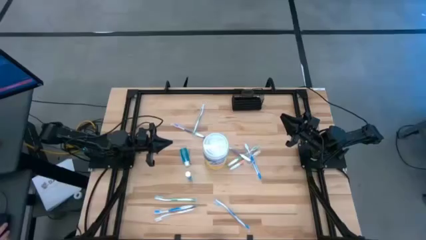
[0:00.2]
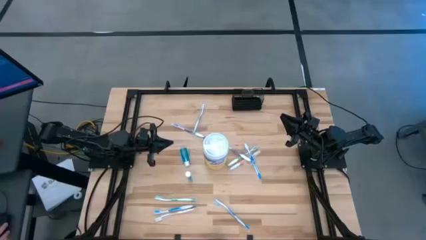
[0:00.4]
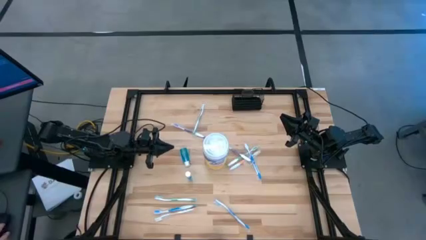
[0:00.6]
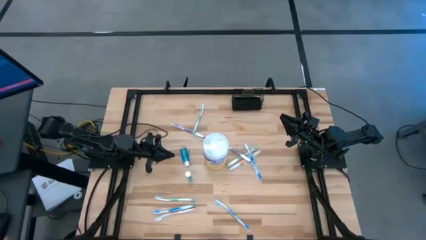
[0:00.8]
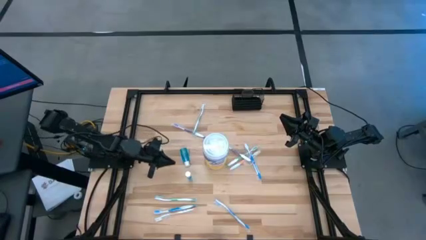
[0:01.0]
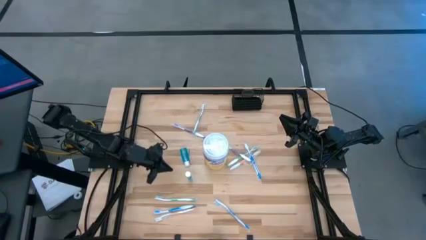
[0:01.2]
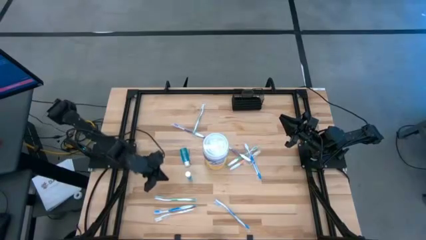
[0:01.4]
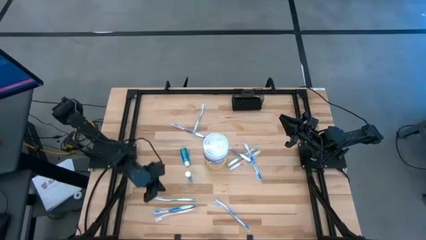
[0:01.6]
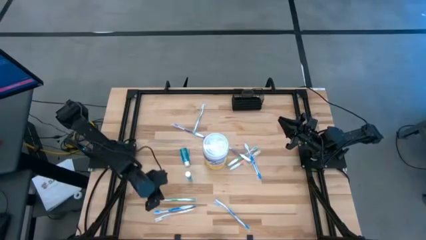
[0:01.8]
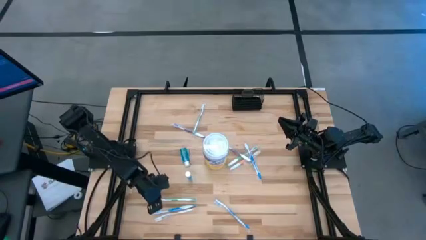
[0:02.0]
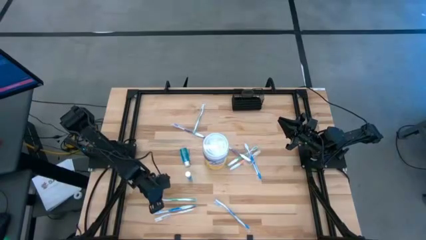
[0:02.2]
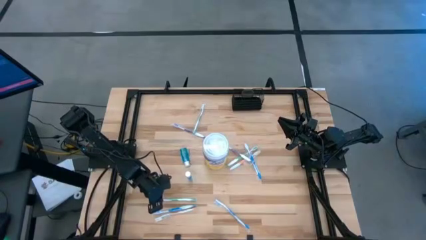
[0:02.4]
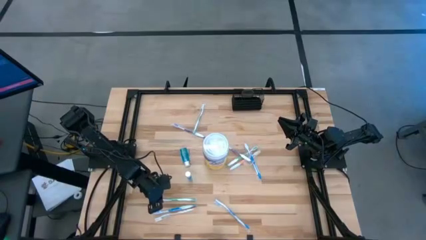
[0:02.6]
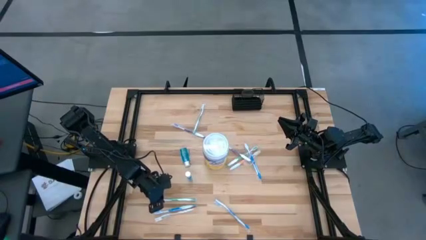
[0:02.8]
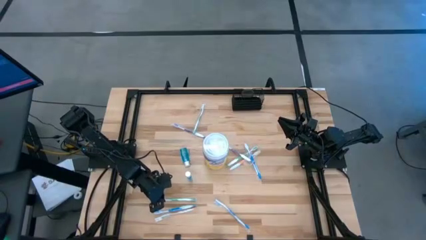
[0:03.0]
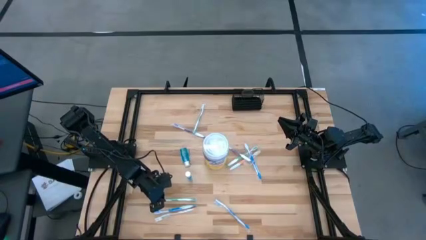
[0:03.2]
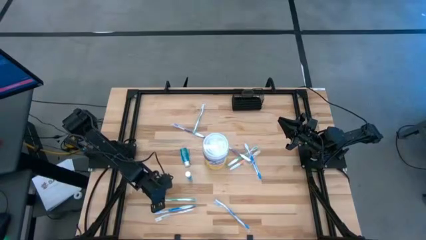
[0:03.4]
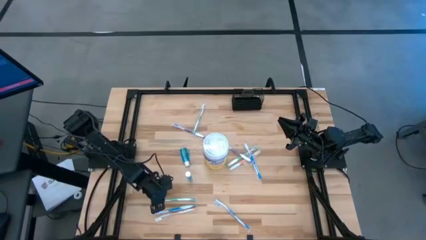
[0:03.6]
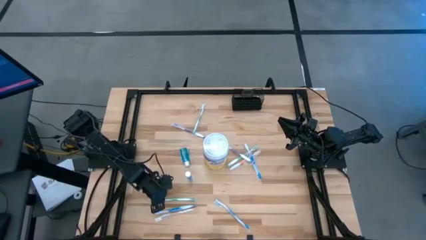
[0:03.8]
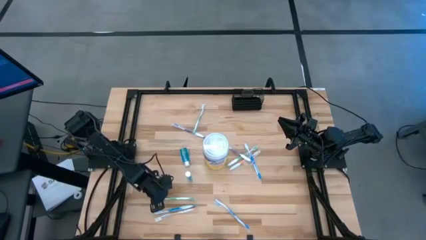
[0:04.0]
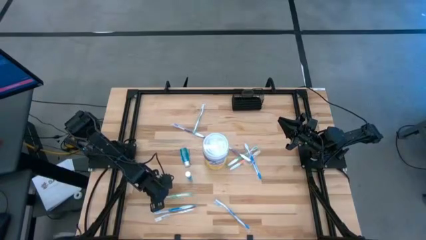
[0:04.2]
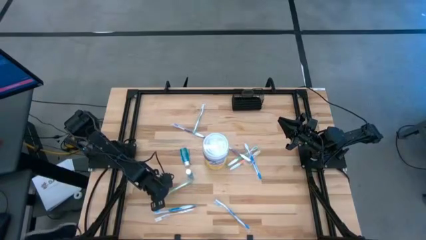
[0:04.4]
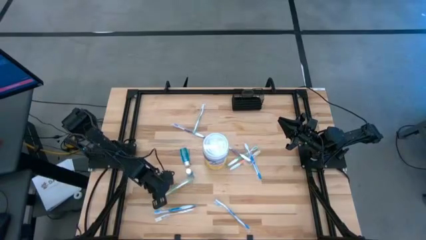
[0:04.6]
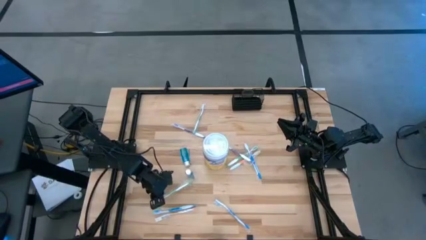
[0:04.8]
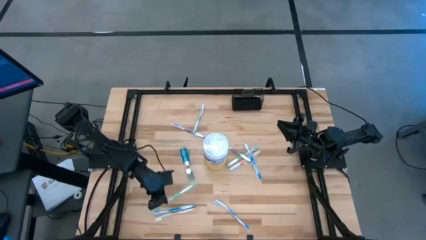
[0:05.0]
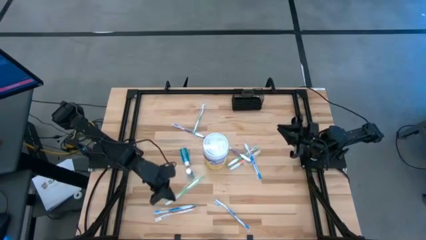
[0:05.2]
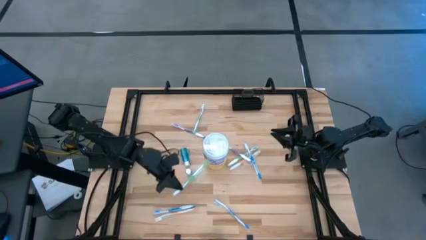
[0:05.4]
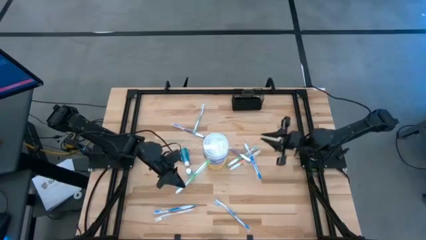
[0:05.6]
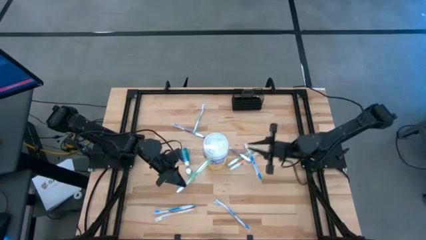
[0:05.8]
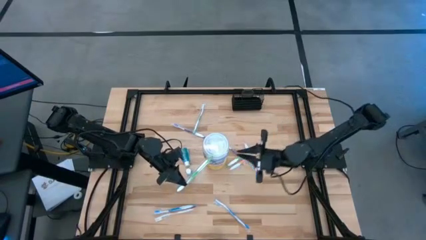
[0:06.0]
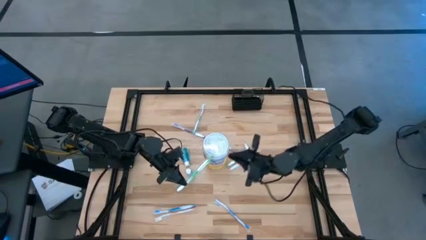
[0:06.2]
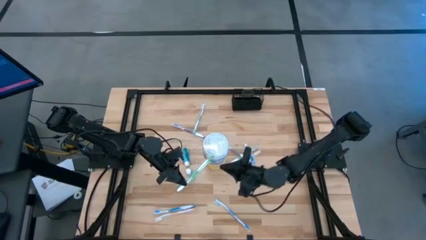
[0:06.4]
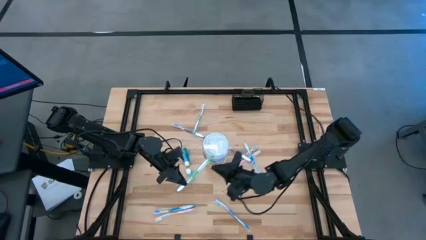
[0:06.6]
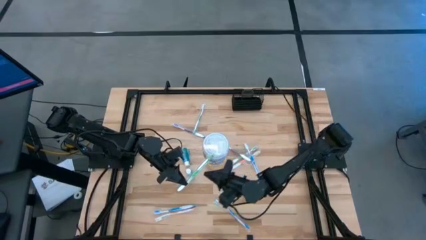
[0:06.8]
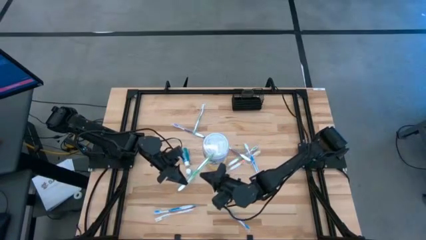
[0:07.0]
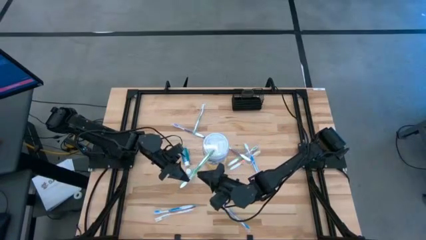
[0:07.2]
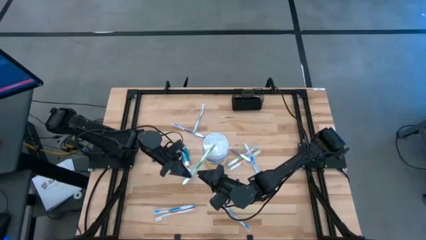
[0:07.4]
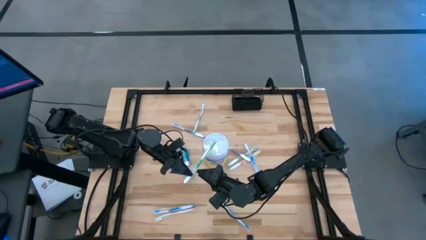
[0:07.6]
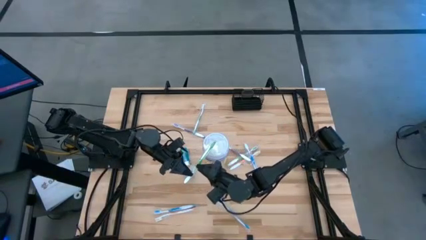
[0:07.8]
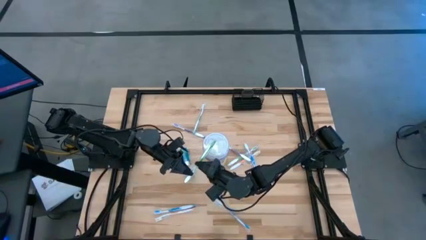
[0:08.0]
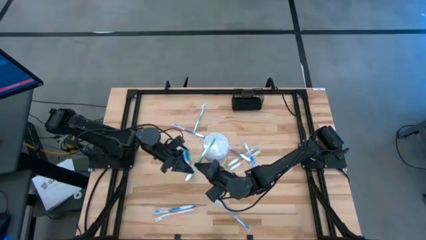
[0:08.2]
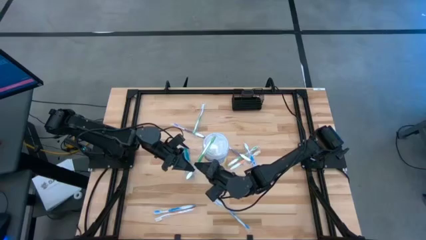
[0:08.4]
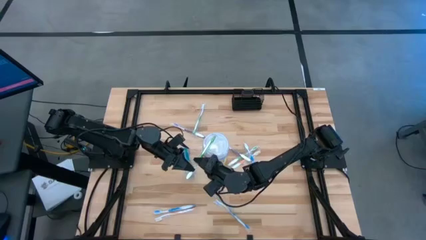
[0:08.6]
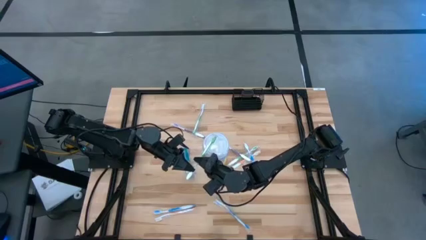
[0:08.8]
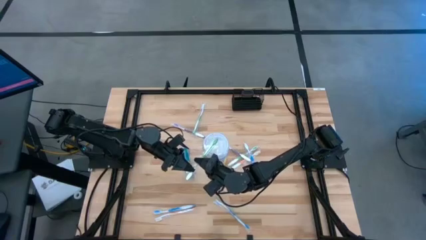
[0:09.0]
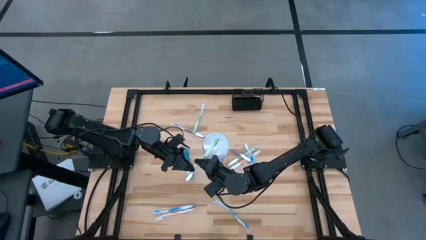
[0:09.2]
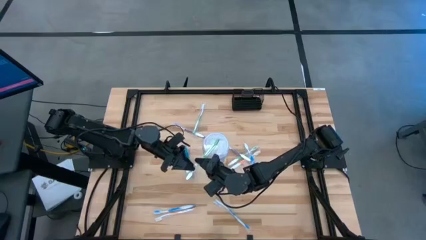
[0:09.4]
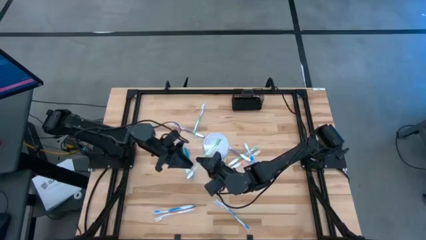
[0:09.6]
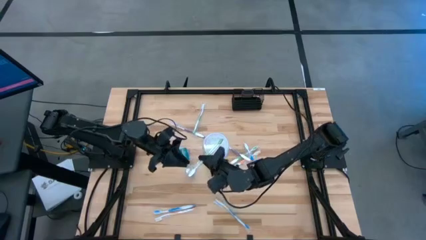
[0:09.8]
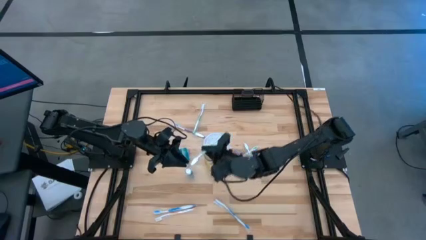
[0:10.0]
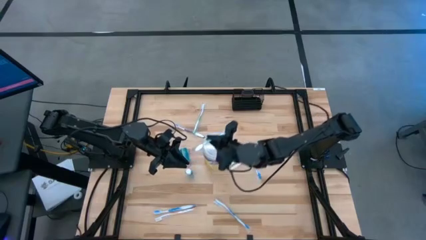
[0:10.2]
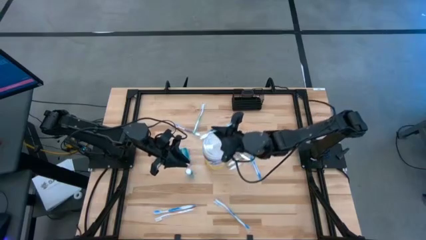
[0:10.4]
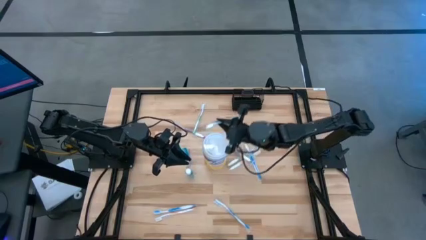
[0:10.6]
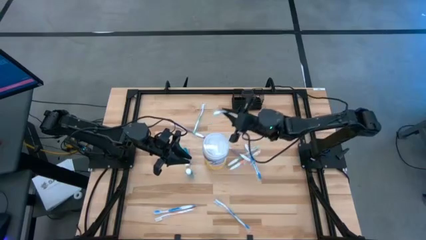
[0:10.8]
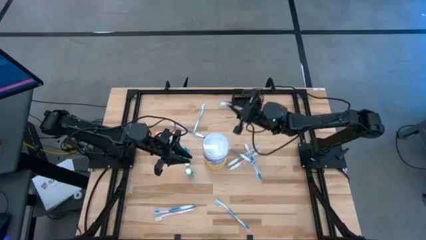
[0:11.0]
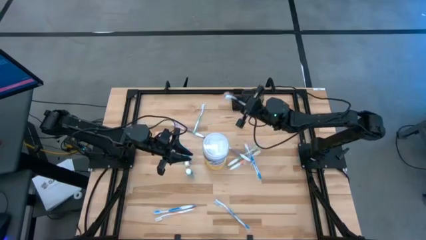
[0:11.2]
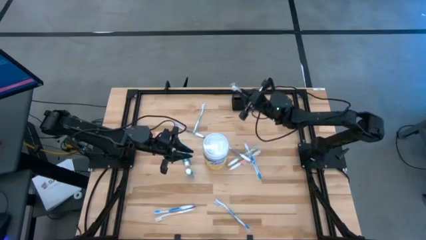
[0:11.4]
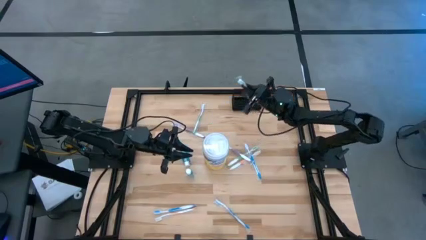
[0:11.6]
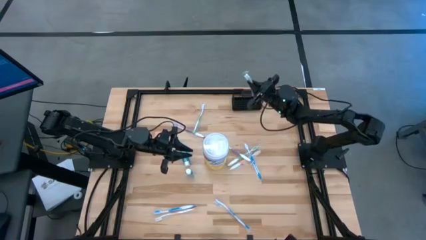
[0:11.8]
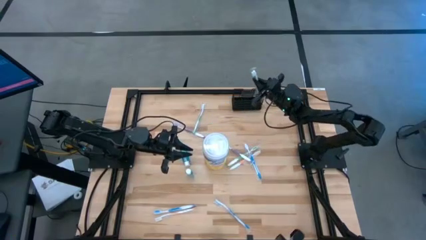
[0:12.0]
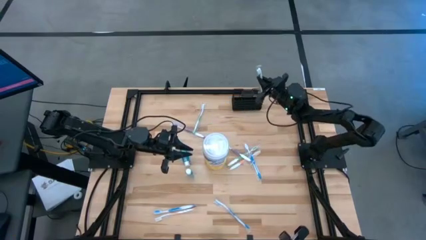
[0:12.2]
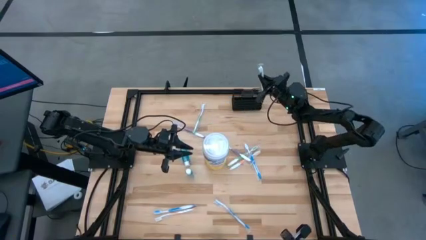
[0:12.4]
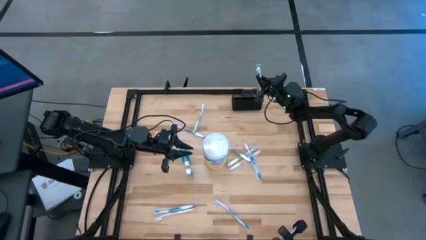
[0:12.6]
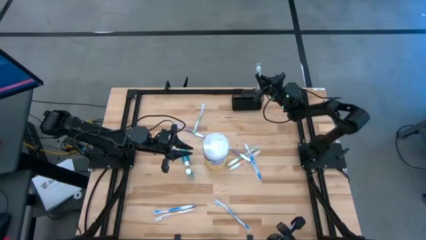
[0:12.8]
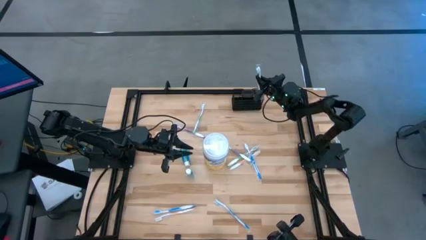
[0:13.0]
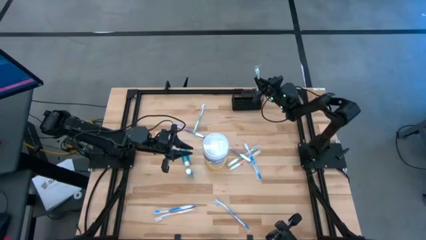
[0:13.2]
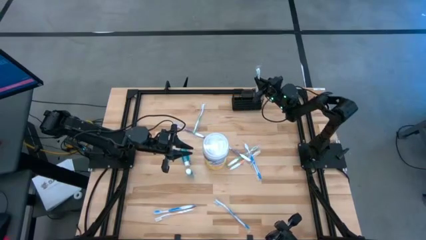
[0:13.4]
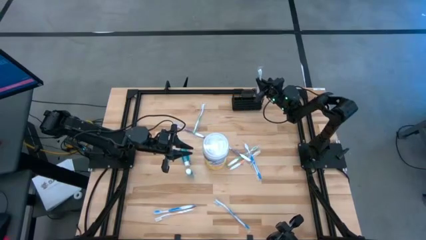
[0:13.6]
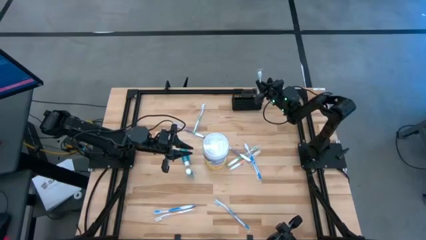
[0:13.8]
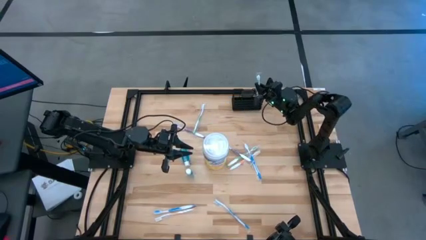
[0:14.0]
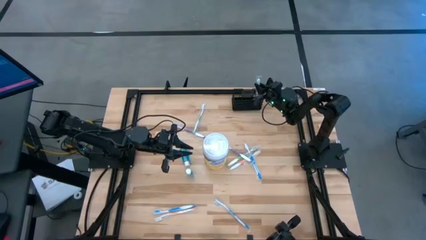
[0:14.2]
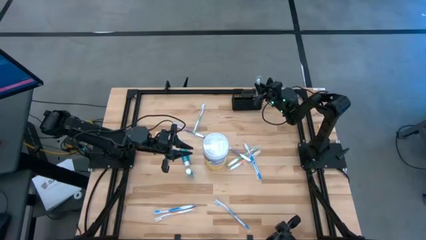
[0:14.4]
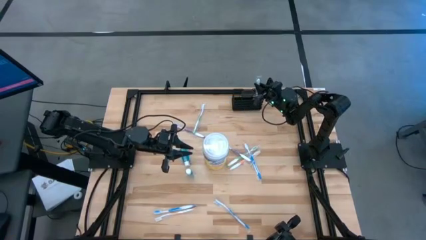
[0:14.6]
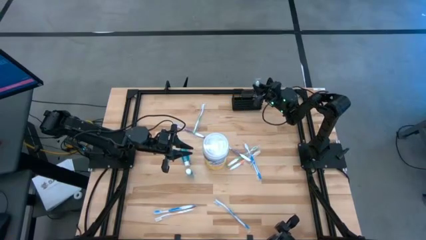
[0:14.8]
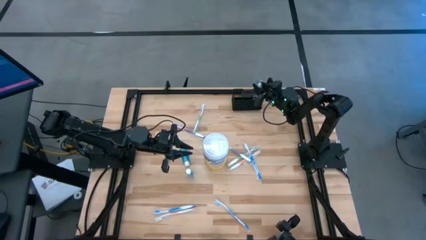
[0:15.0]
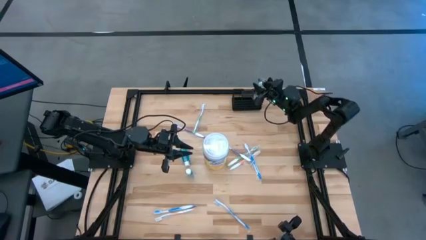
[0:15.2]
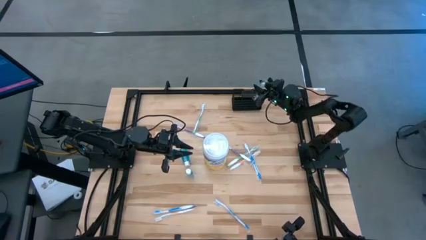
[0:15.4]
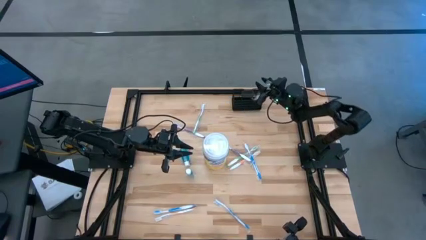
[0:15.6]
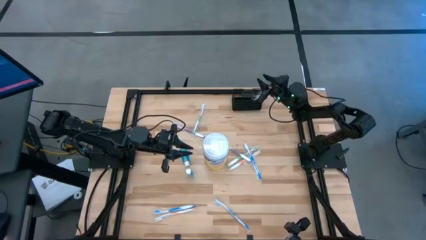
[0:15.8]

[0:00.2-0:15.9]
Task: Pick & Place toothbrushing station
Put the bottom left green toothbrush into the black mesh organizer
